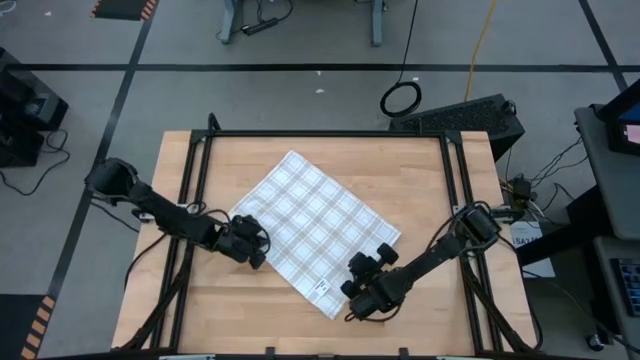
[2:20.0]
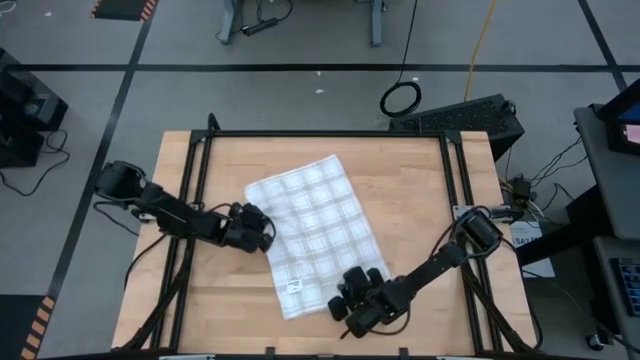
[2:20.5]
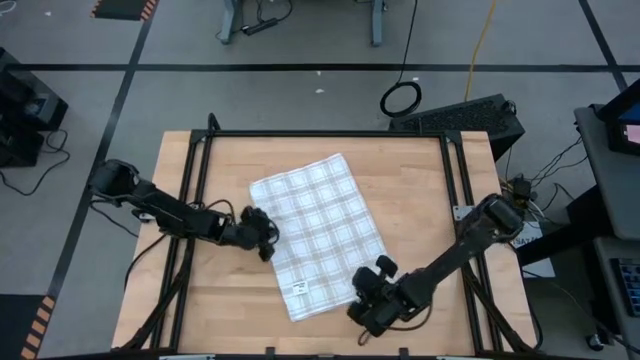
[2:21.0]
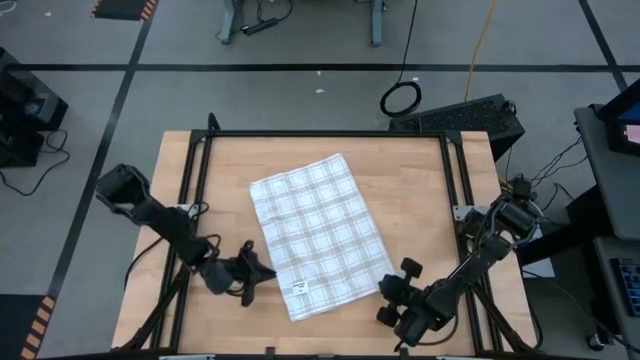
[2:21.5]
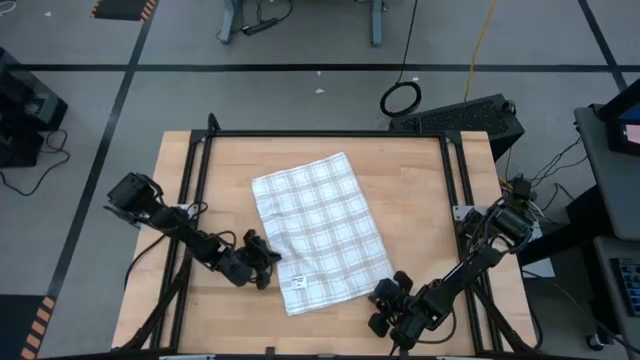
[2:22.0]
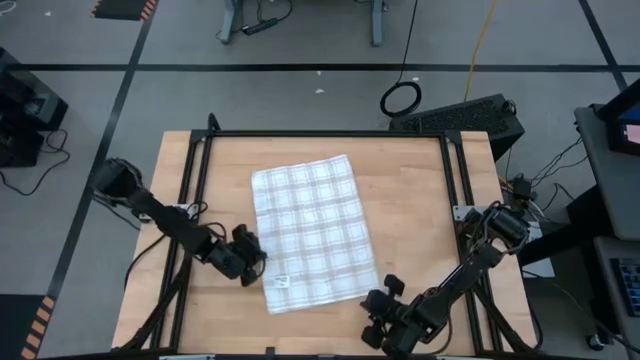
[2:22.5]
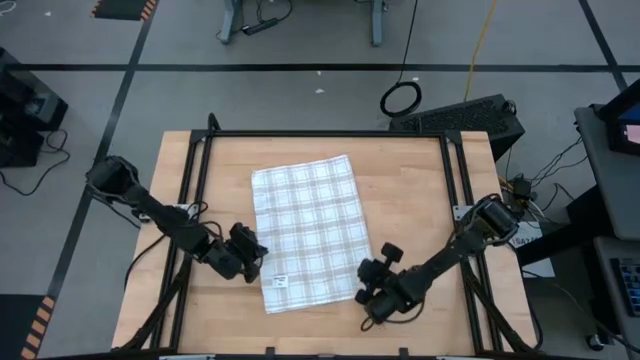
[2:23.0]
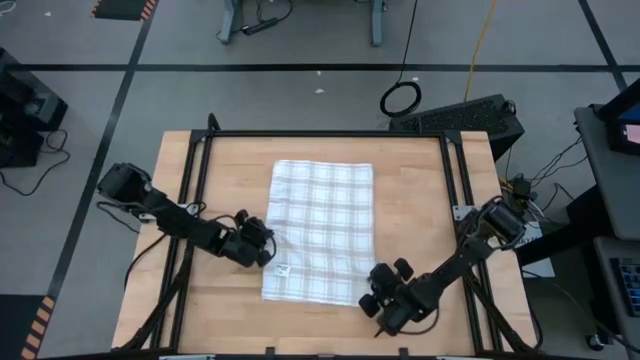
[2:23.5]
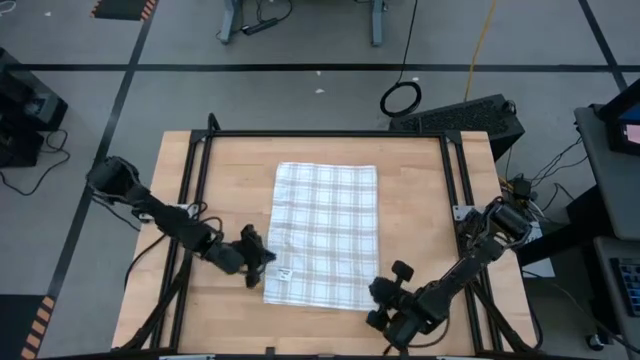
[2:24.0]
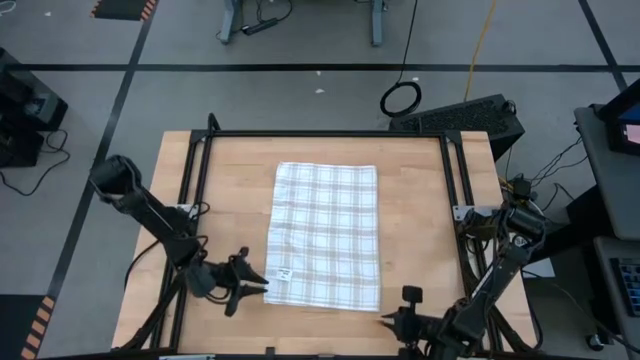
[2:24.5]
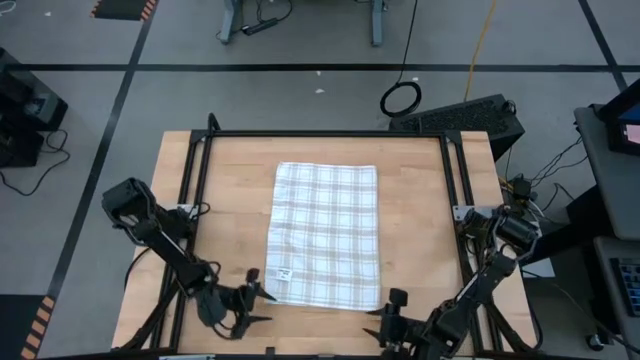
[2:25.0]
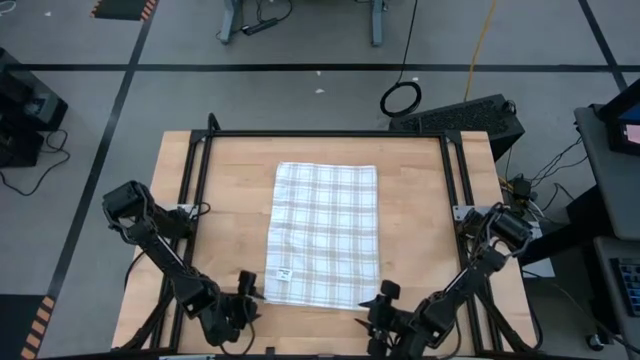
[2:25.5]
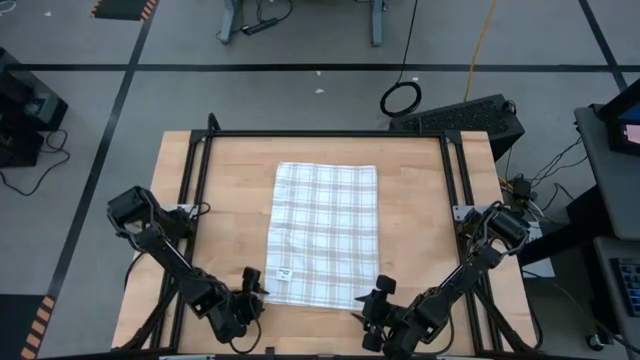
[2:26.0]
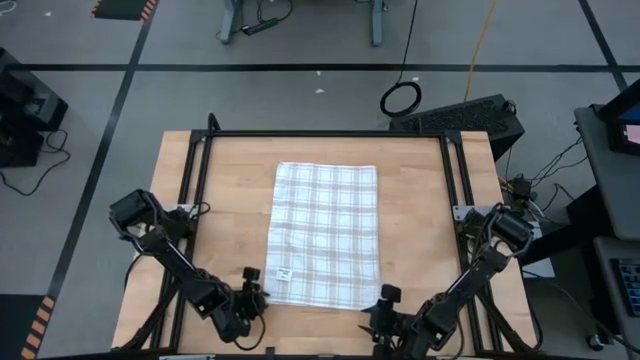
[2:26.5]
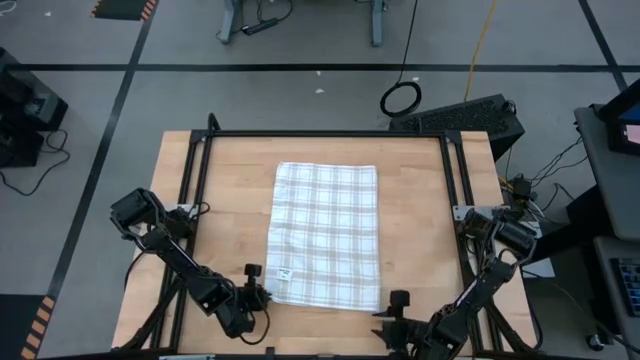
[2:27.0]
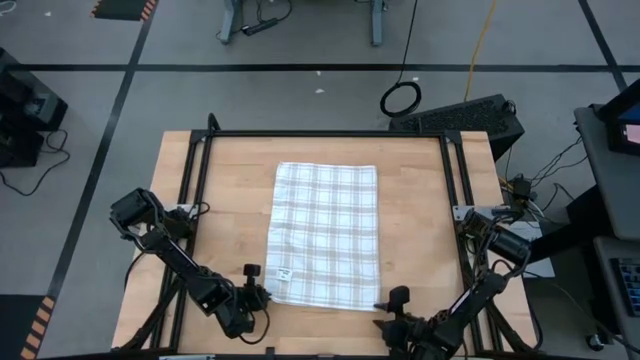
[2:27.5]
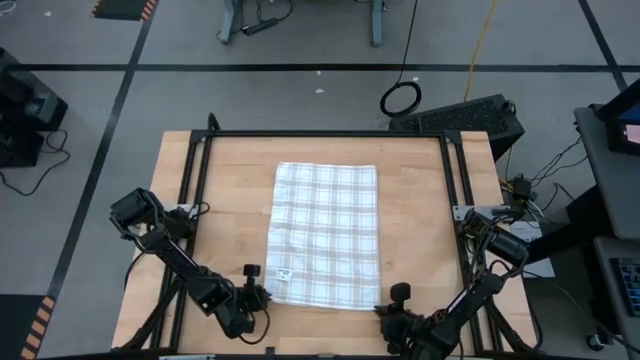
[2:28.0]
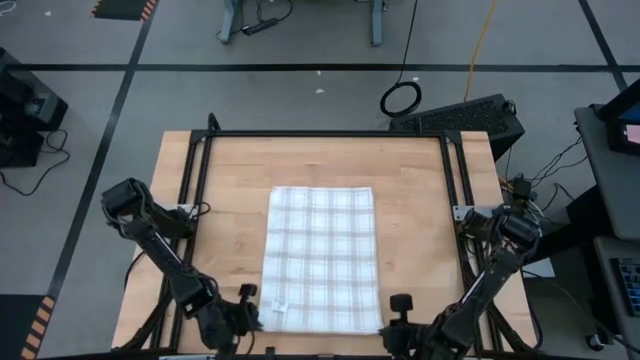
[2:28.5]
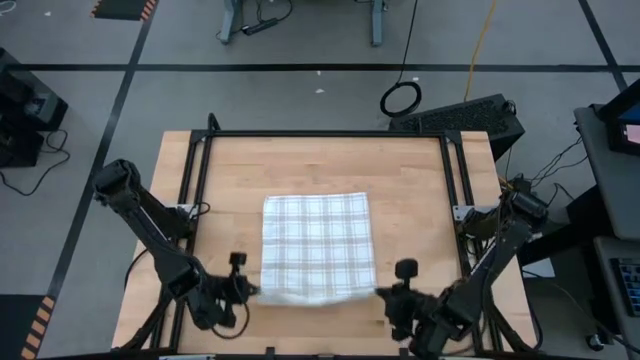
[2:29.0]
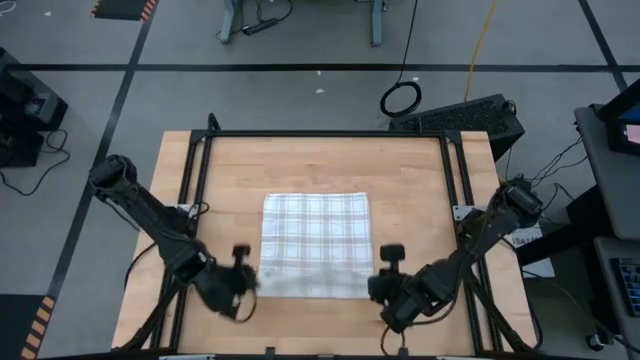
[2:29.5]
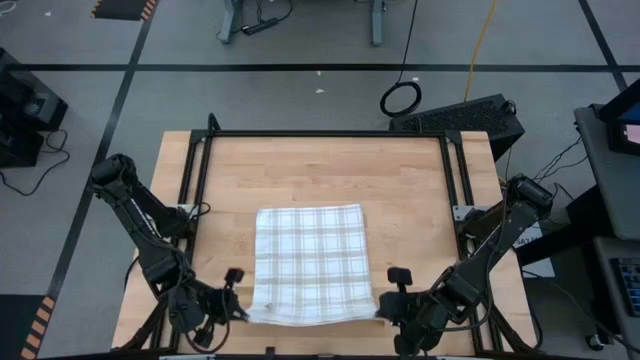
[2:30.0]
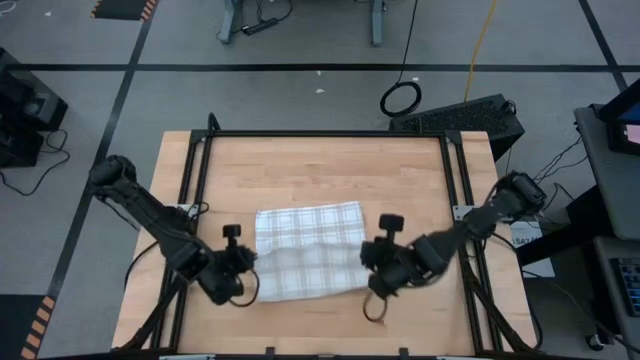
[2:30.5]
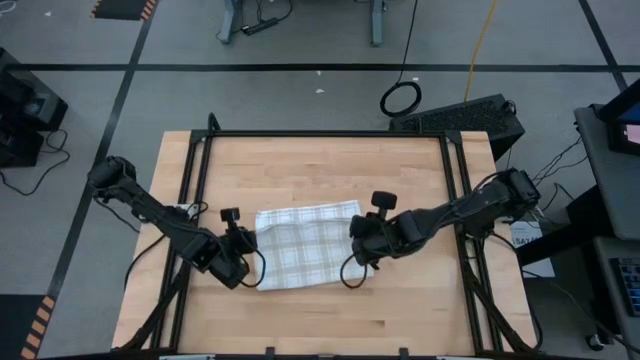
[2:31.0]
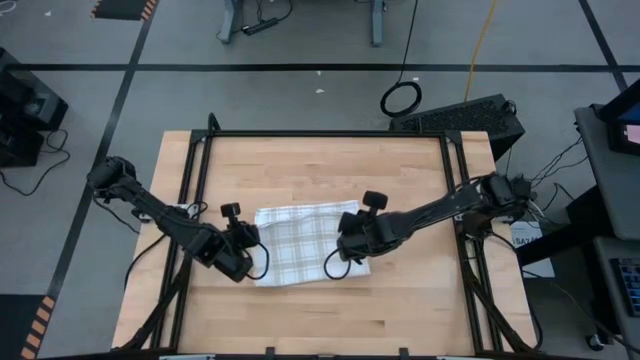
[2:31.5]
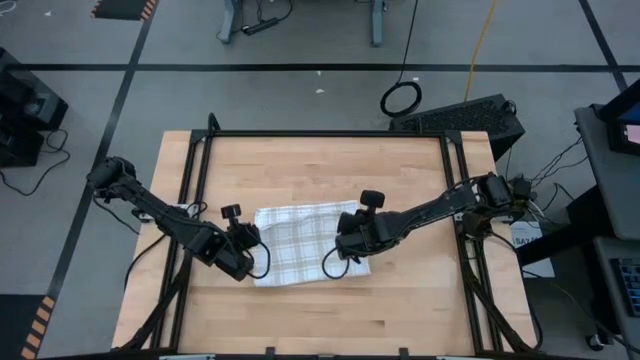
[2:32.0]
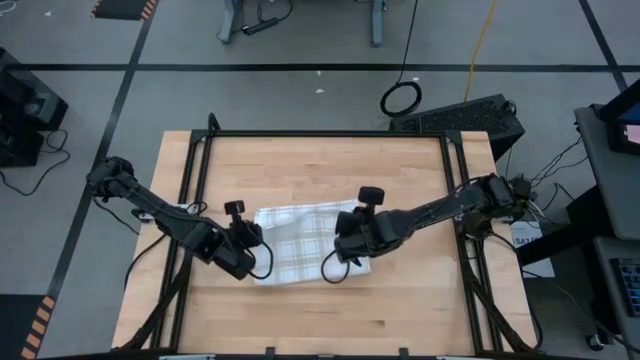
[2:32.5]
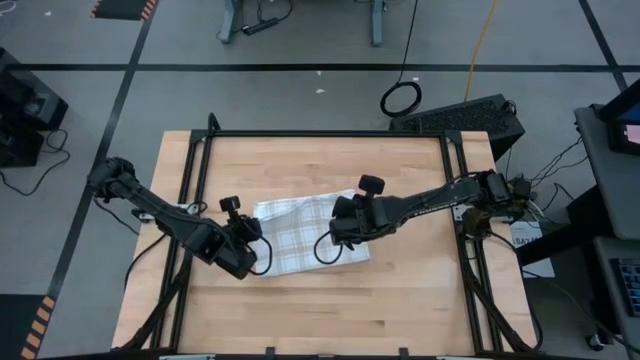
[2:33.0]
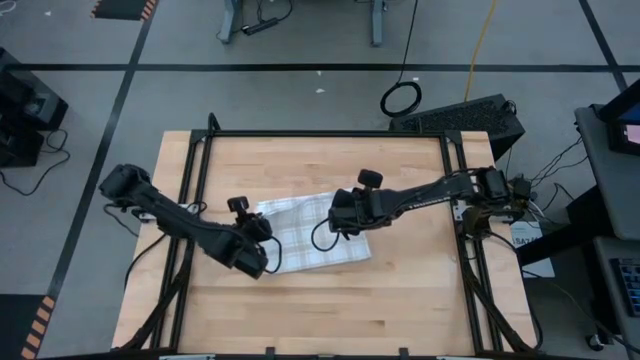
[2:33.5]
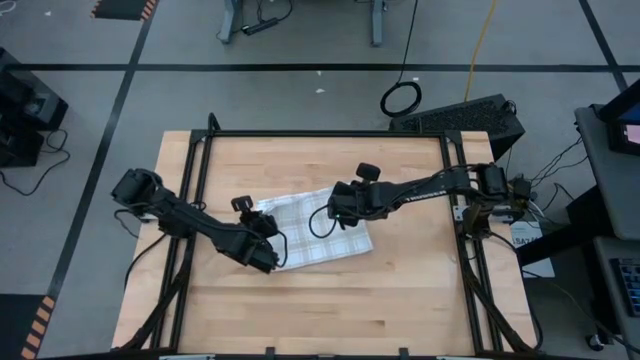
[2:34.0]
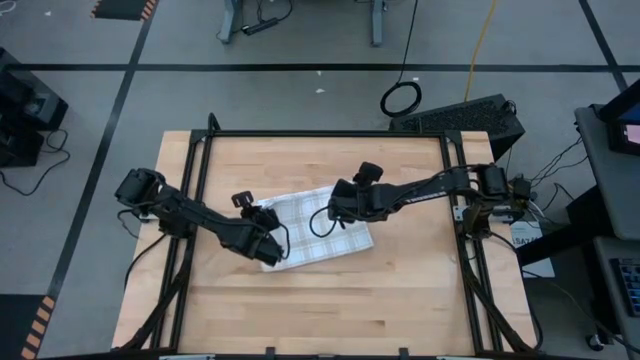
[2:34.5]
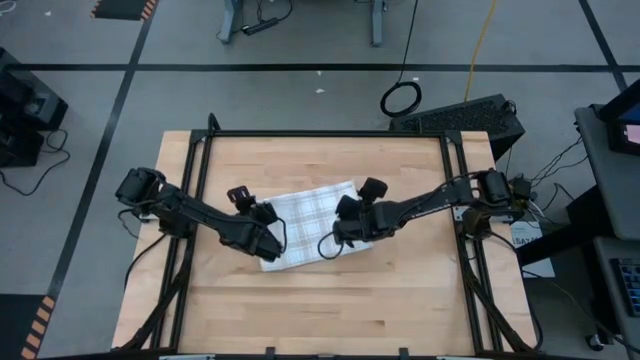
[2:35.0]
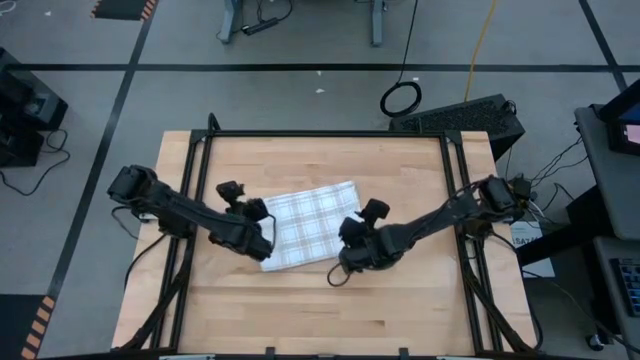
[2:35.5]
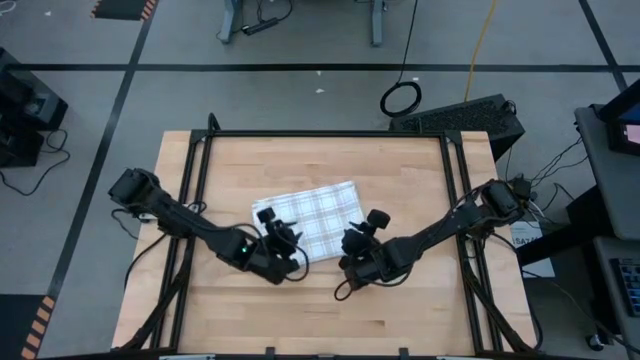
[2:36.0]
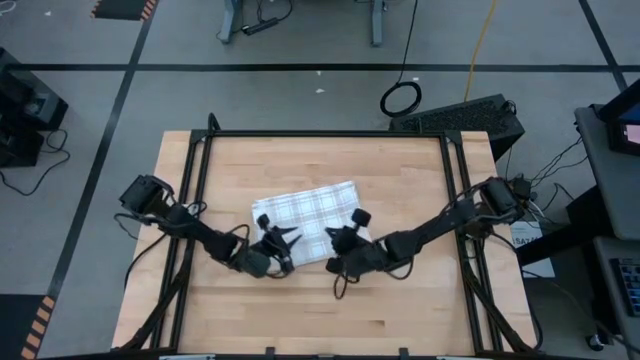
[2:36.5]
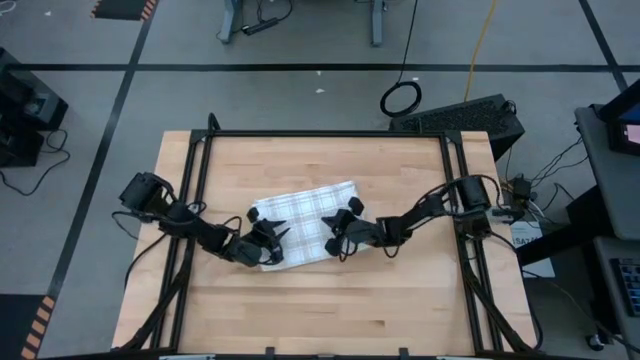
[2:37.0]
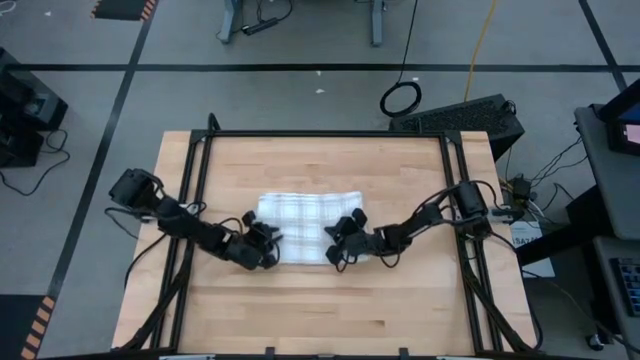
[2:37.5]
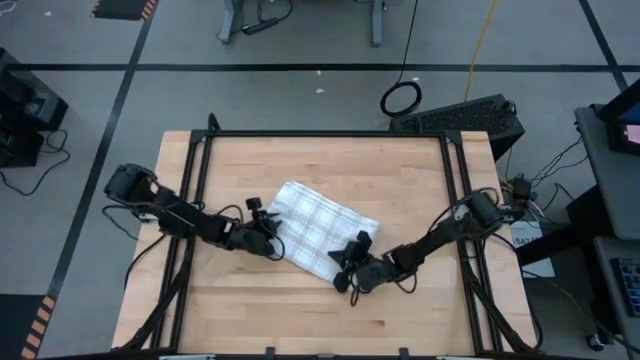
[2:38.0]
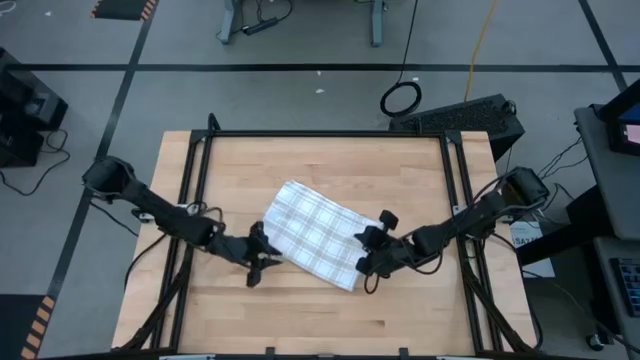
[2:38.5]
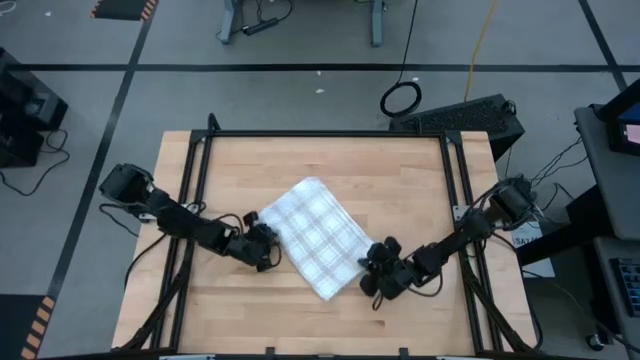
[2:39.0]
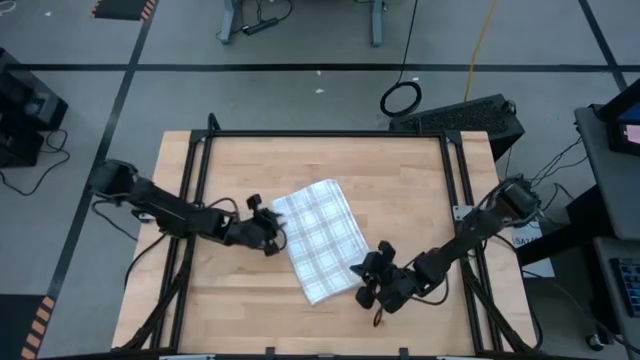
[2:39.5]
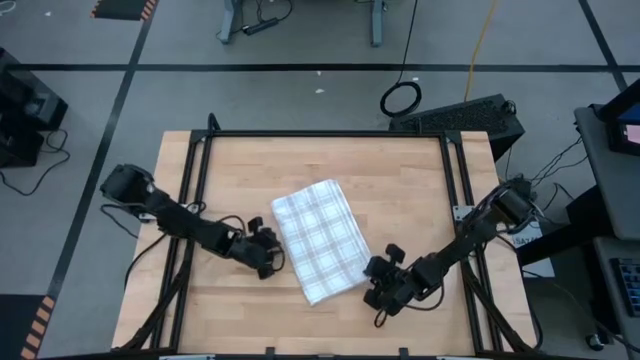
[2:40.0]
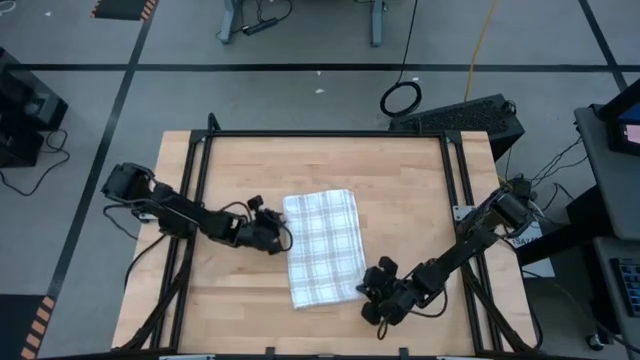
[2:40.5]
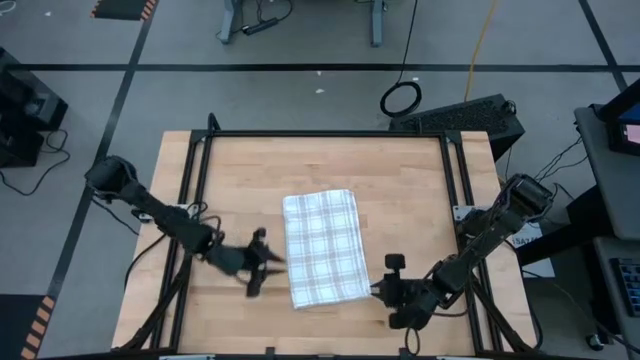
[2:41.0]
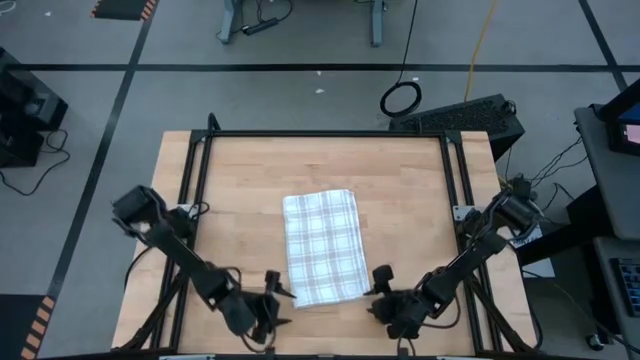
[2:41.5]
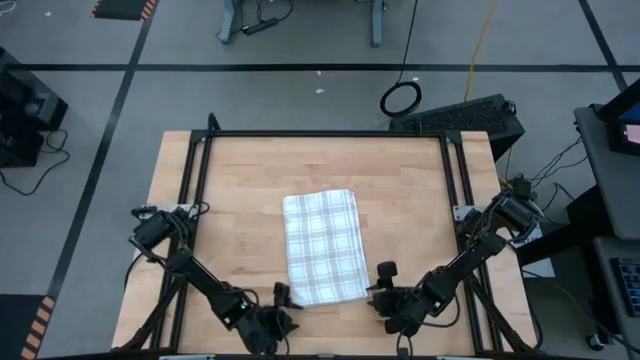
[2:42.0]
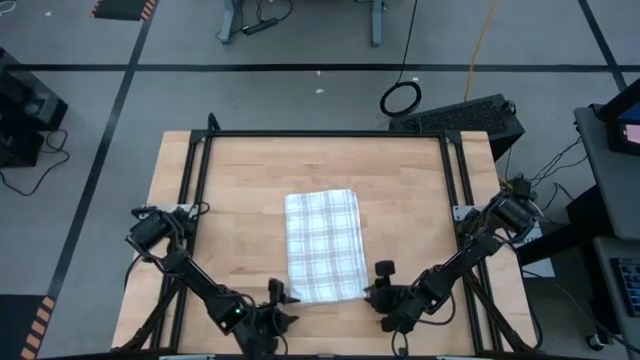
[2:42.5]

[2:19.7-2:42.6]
Task: Roll towel
Roll the towel
